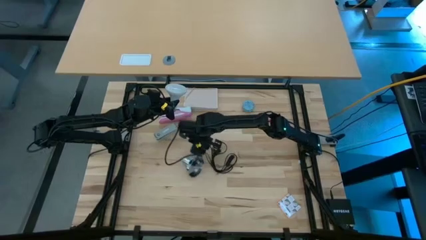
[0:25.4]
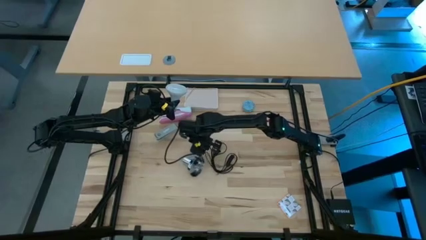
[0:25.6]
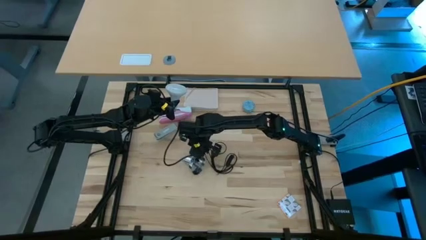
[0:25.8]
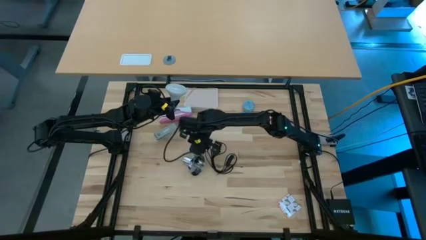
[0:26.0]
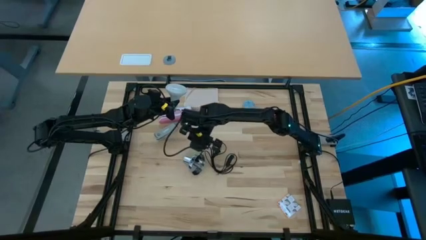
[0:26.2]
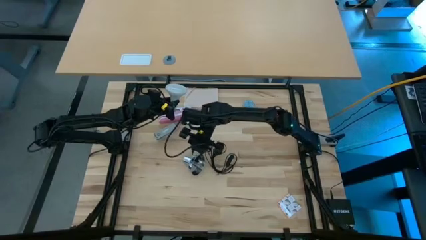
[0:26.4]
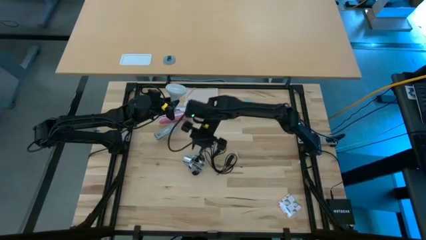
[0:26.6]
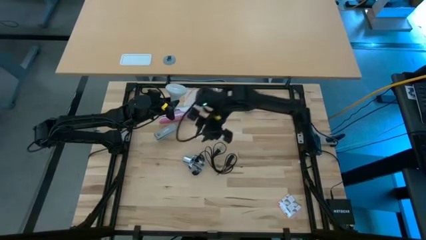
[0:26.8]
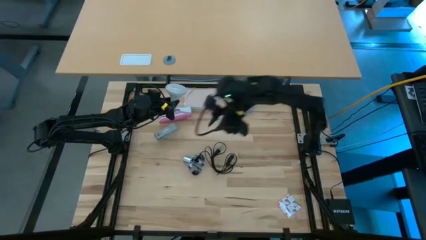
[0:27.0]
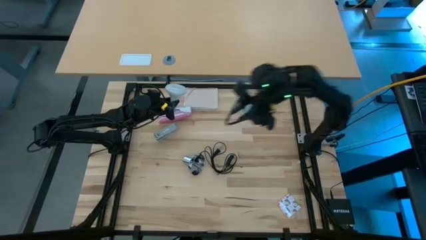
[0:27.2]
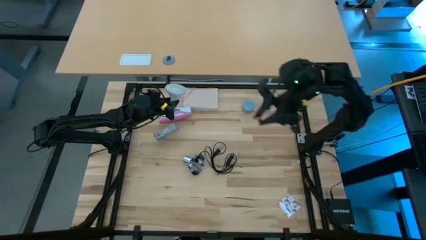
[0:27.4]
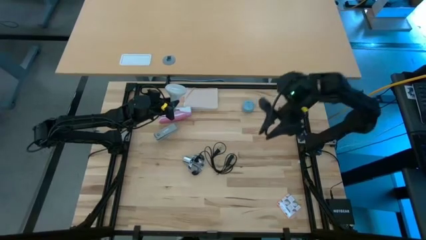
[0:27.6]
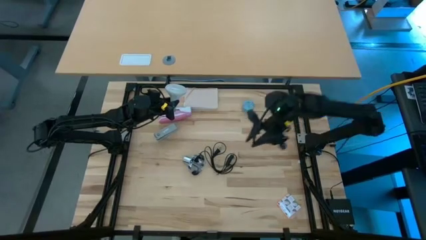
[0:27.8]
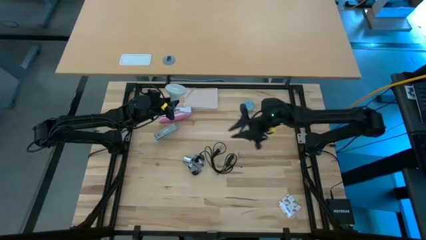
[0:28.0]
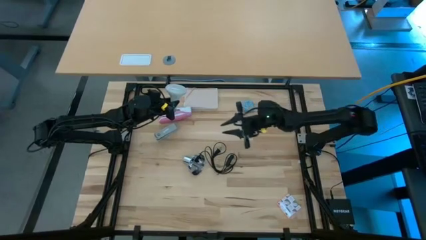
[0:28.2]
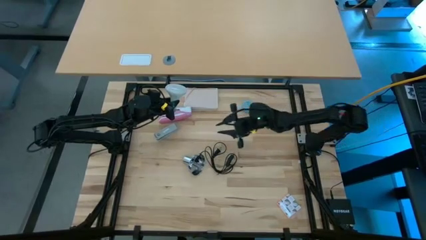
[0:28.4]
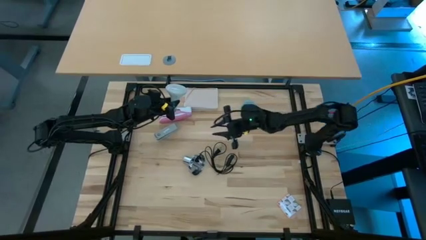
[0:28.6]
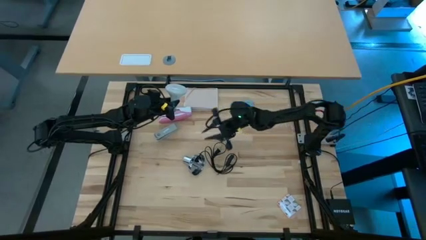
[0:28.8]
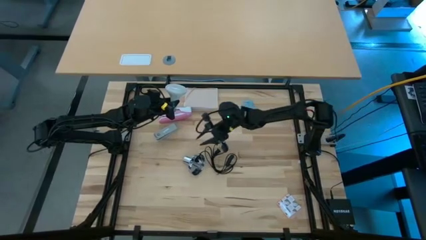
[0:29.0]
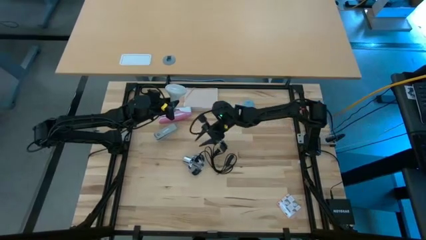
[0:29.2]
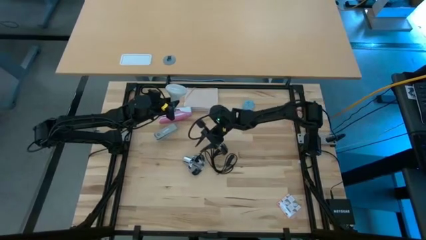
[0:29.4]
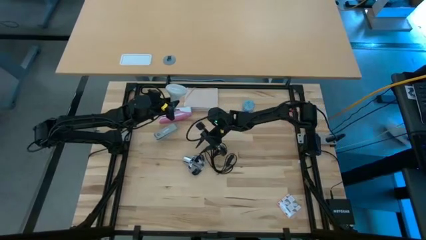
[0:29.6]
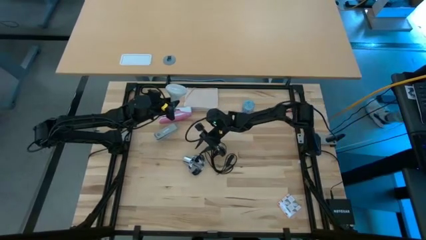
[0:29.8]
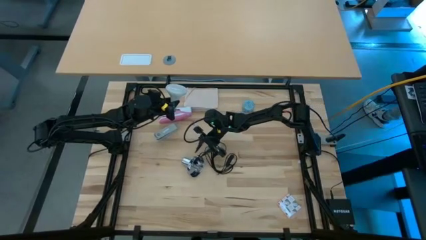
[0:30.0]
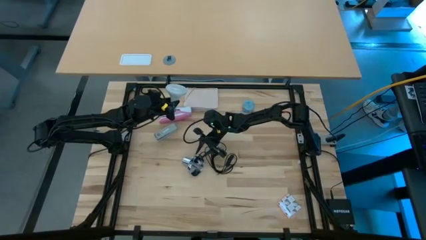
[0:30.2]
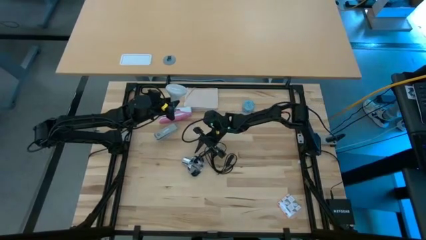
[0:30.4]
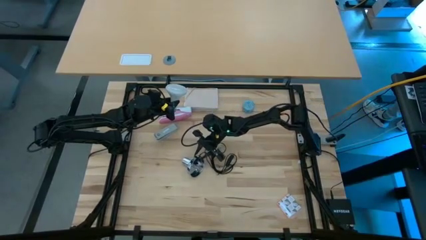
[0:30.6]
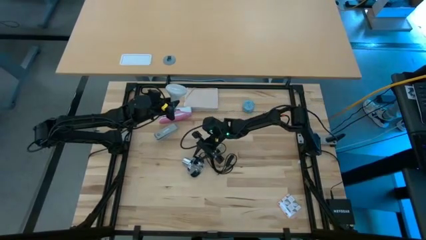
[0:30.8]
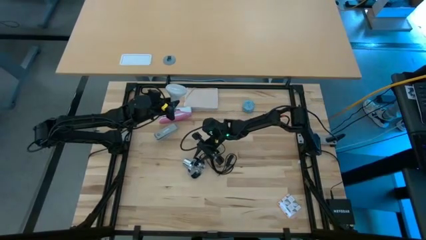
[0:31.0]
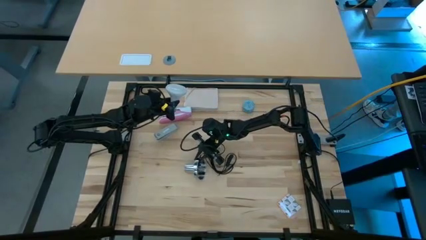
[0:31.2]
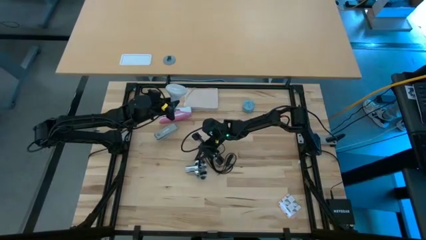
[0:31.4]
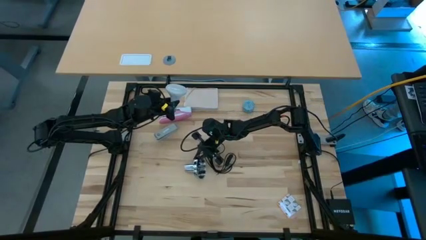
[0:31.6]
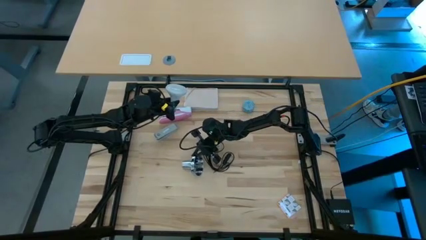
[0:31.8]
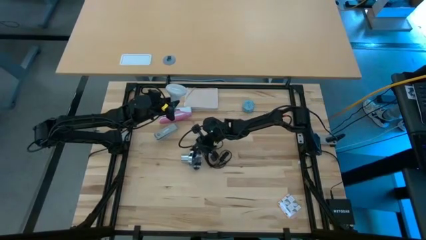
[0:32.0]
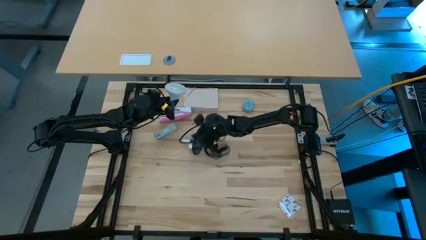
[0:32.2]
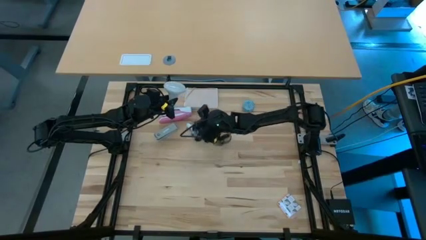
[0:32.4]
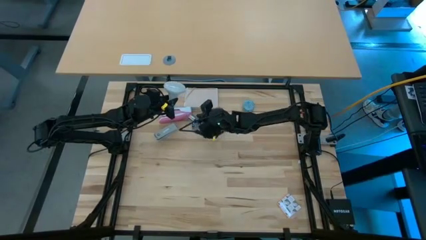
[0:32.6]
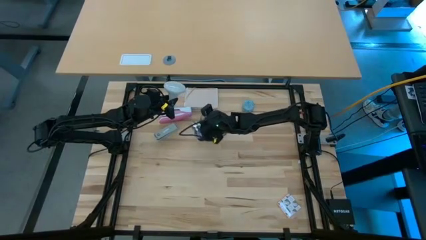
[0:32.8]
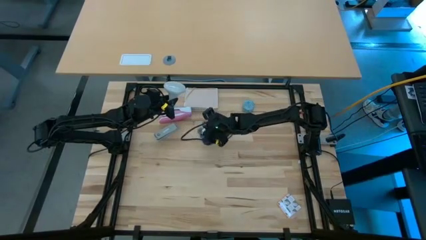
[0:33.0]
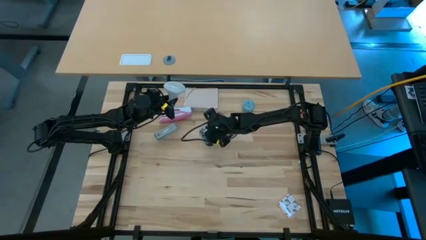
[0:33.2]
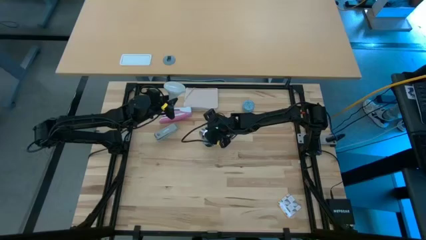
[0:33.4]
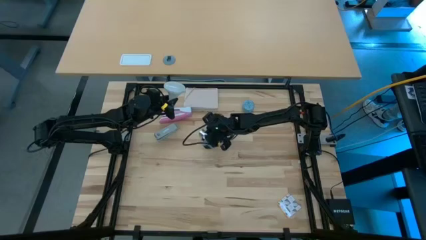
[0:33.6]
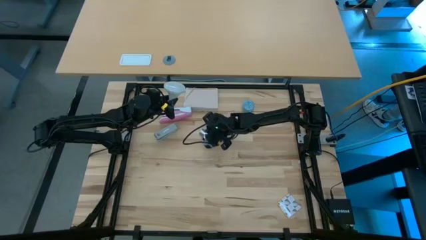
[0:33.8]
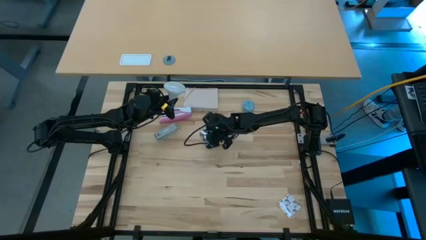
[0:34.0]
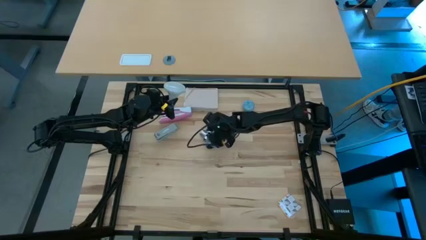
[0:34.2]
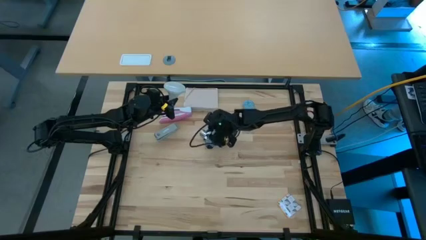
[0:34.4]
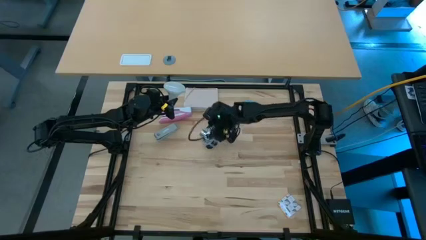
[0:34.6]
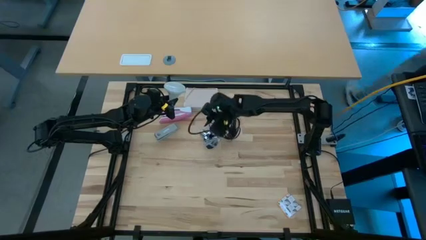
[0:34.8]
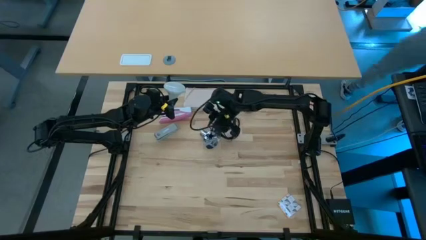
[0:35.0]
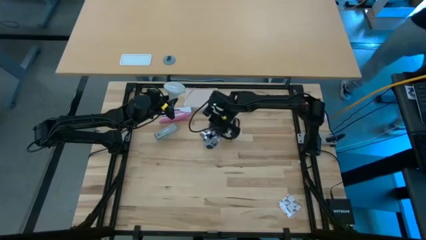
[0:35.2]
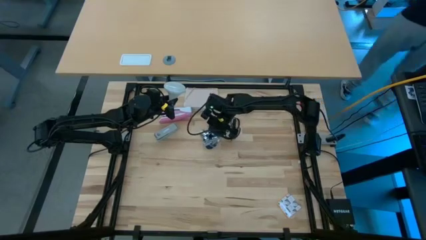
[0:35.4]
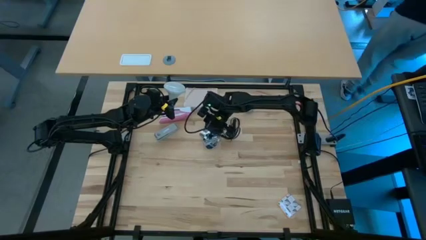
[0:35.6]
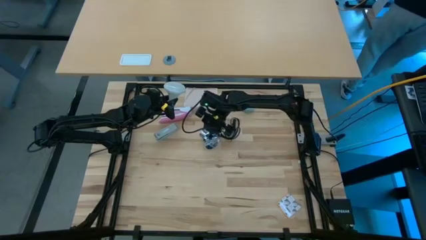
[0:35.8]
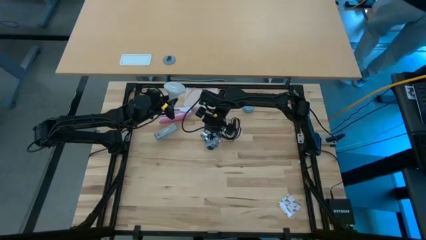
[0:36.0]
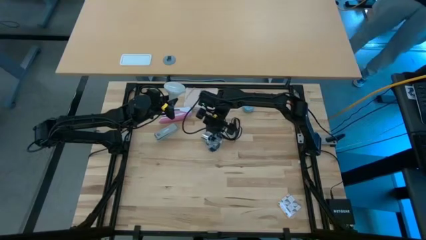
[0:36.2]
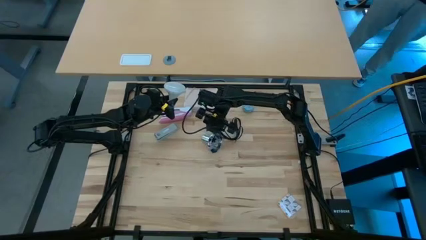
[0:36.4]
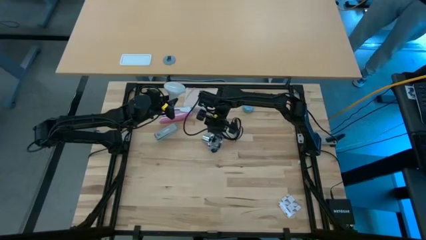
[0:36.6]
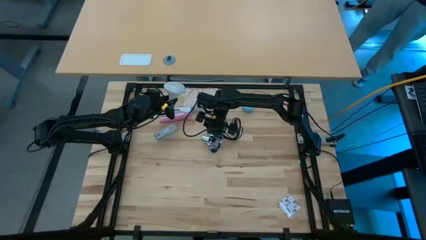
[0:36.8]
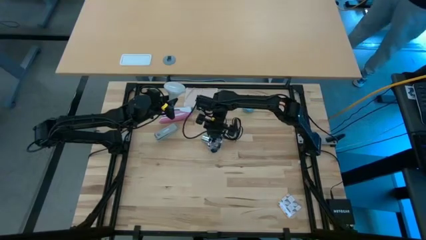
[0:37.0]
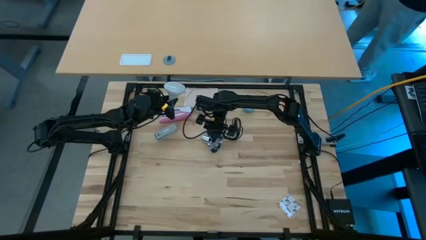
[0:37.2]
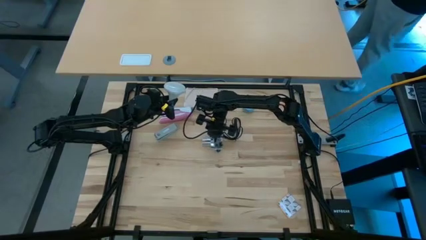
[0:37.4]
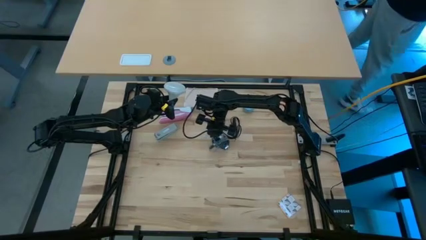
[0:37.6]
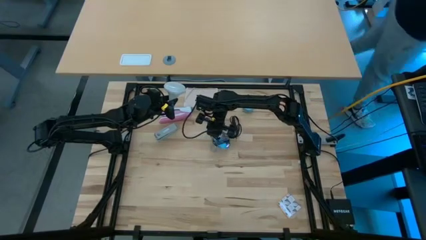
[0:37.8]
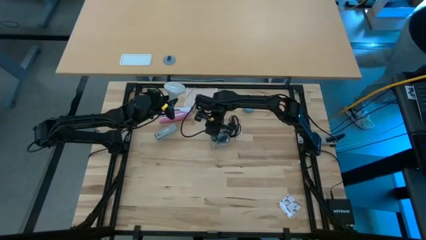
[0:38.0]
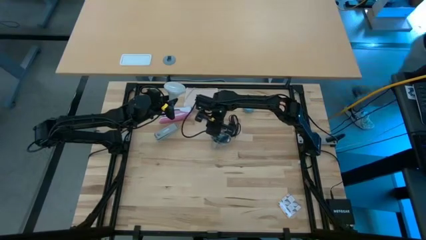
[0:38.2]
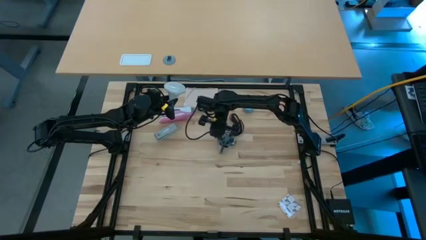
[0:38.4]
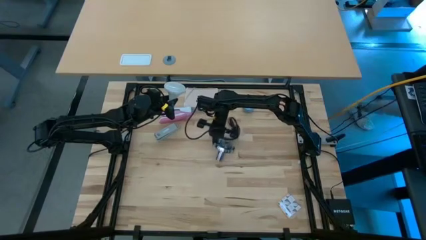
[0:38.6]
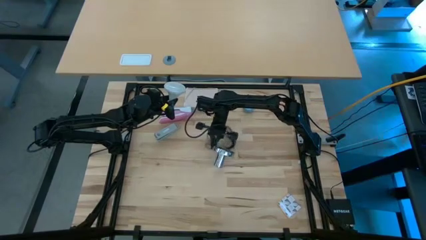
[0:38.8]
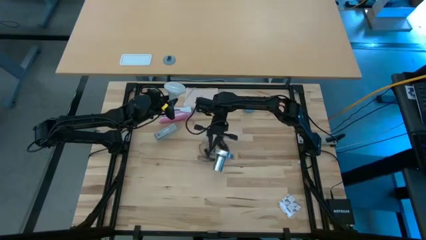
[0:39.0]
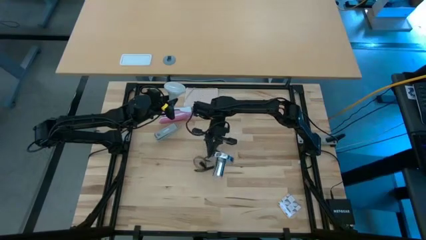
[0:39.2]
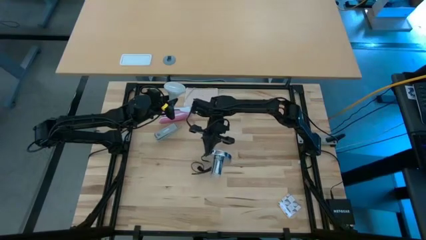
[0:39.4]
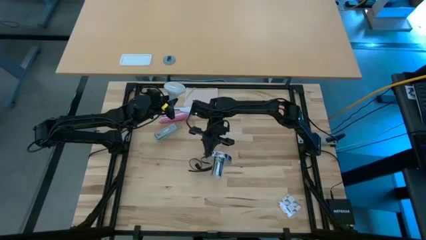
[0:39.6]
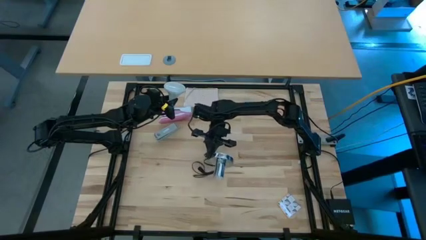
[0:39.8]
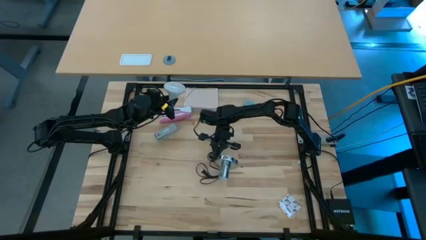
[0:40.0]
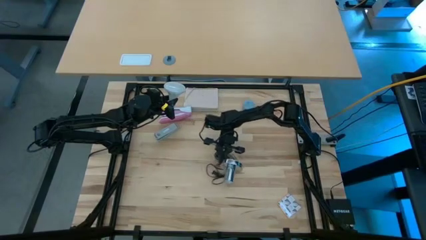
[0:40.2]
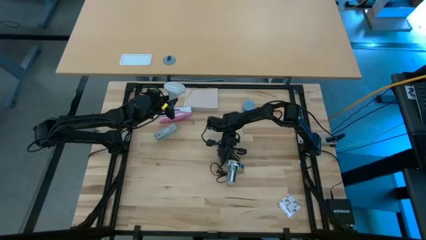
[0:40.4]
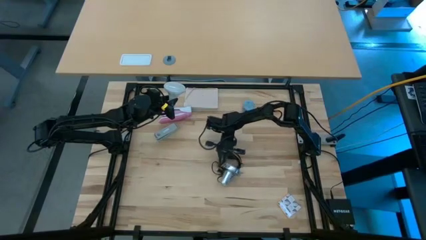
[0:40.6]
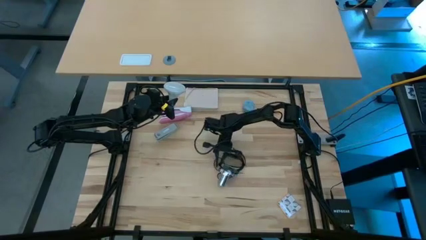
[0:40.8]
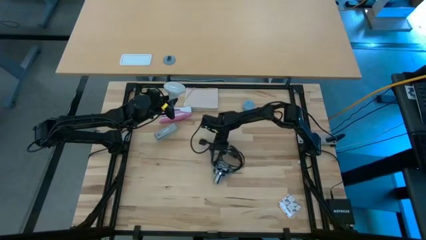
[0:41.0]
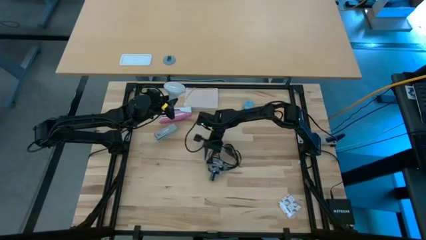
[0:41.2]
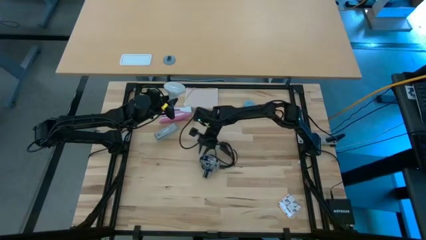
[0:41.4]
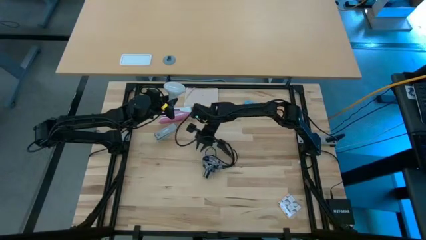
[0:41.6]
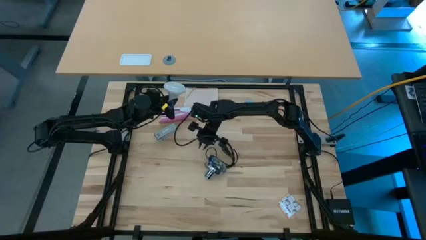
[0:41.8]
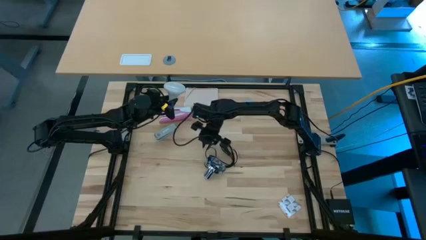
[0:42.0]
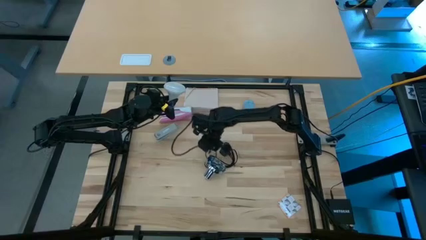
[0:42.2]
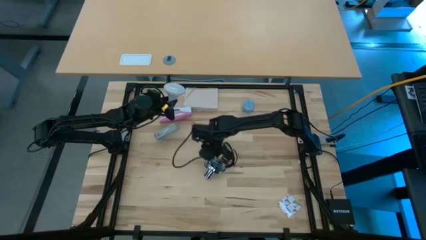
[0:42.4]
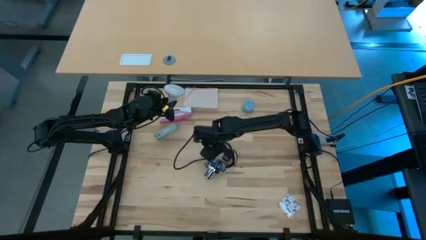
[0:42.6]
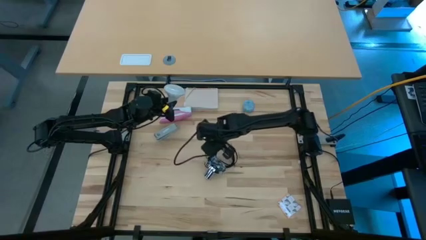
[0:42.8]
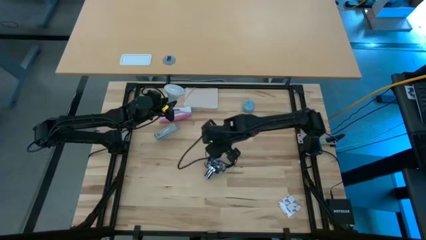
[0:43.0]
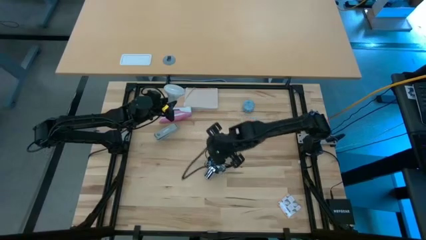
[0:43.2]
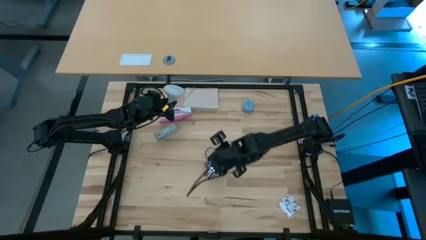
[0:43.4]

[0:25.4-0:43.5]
Task: Screw lightbulb
Insert the white lightbulb into the desk lamp
